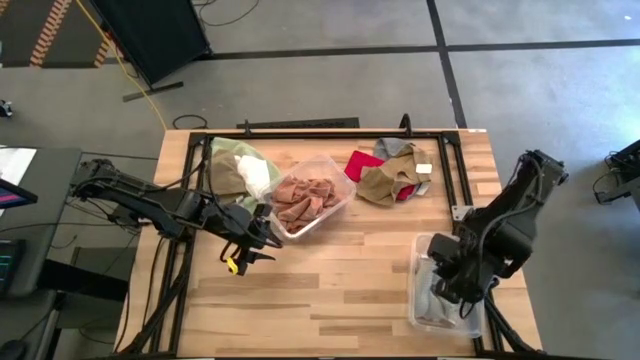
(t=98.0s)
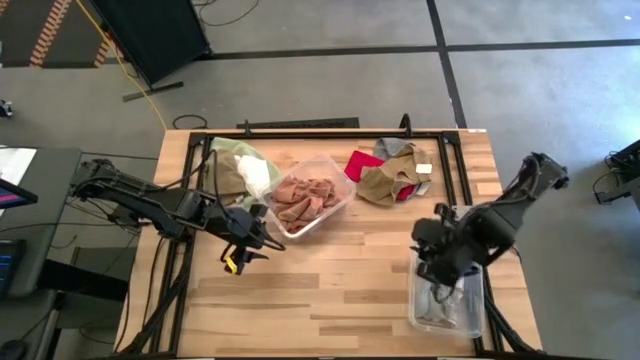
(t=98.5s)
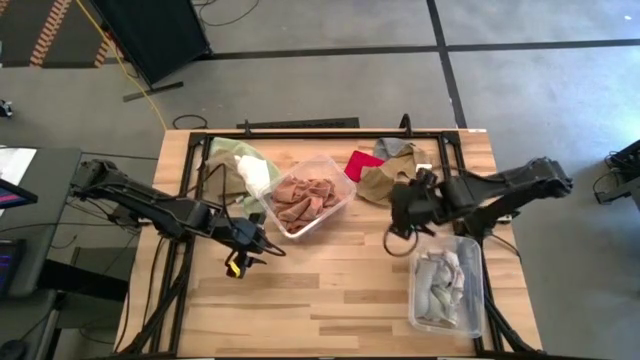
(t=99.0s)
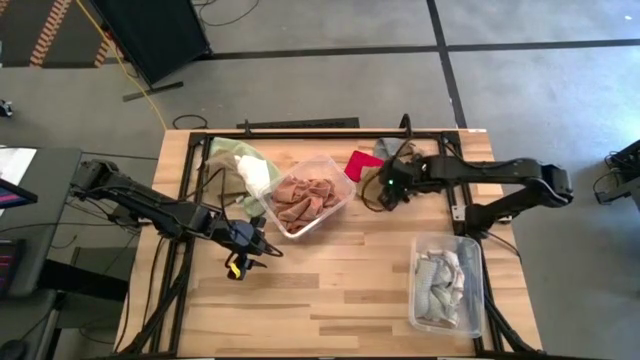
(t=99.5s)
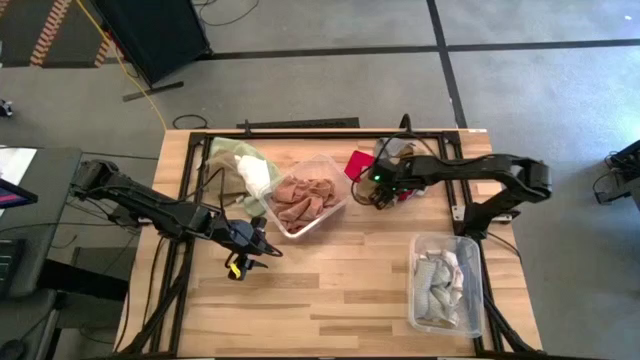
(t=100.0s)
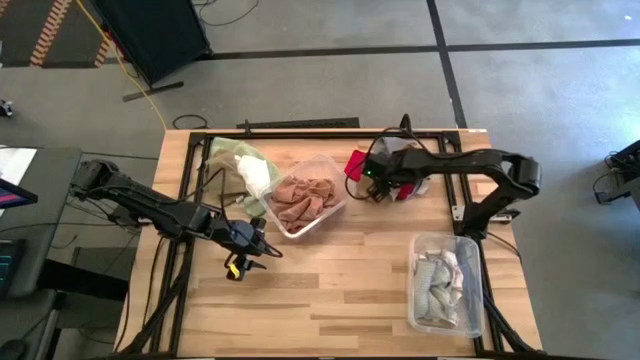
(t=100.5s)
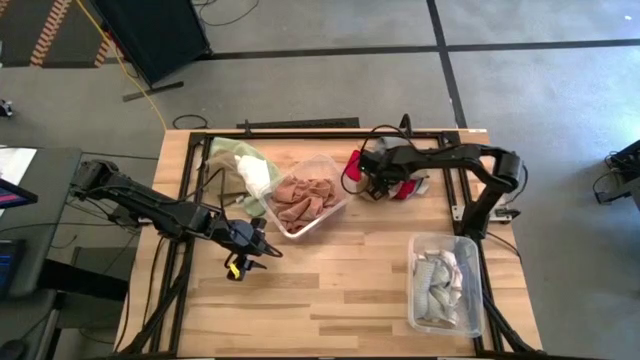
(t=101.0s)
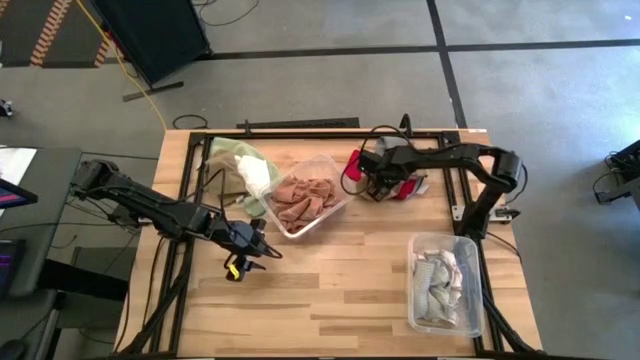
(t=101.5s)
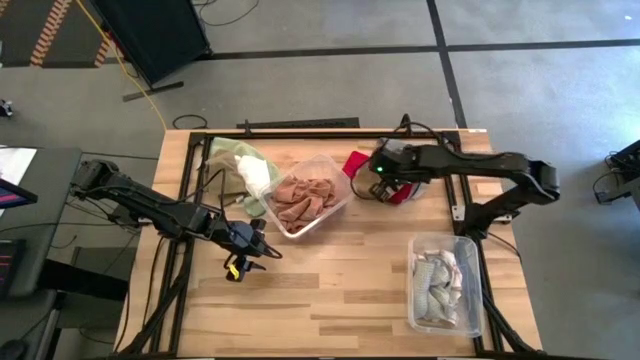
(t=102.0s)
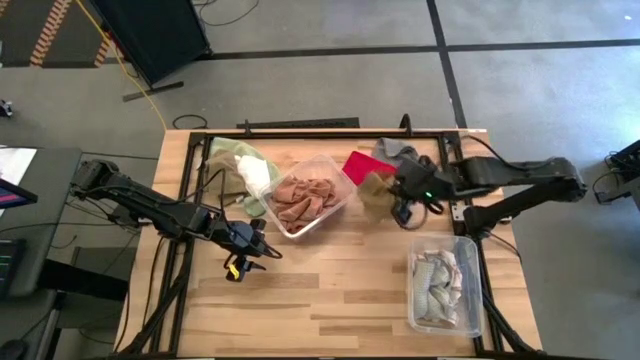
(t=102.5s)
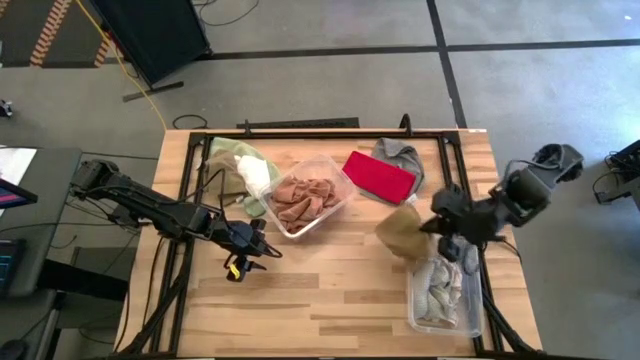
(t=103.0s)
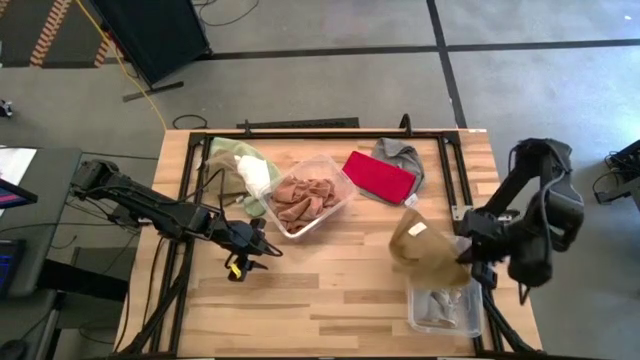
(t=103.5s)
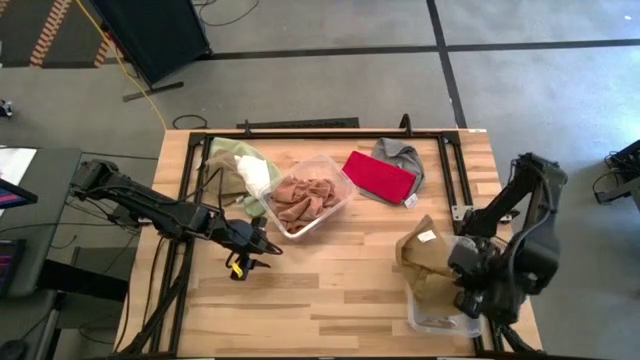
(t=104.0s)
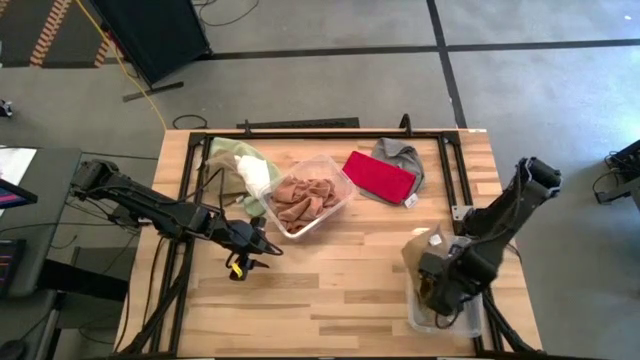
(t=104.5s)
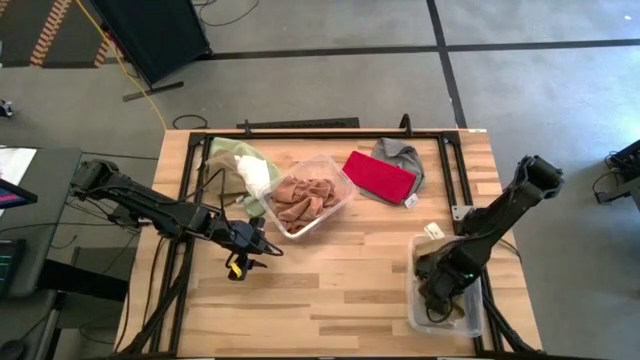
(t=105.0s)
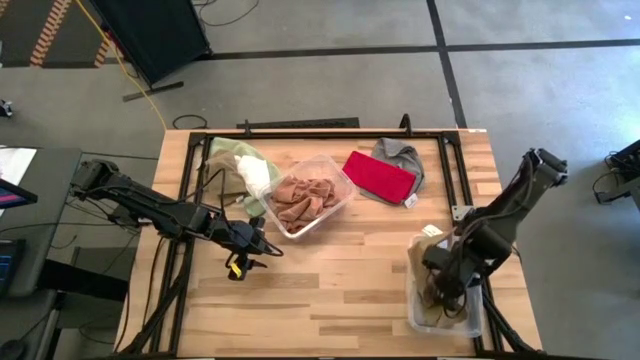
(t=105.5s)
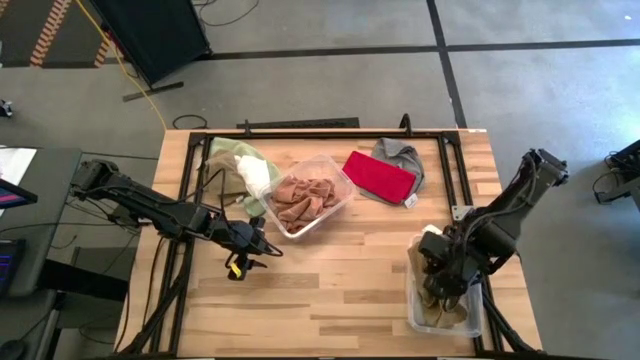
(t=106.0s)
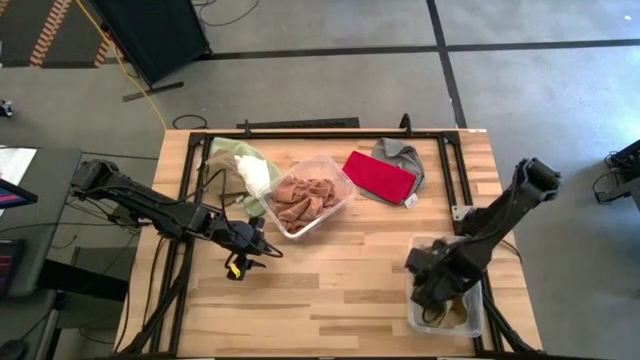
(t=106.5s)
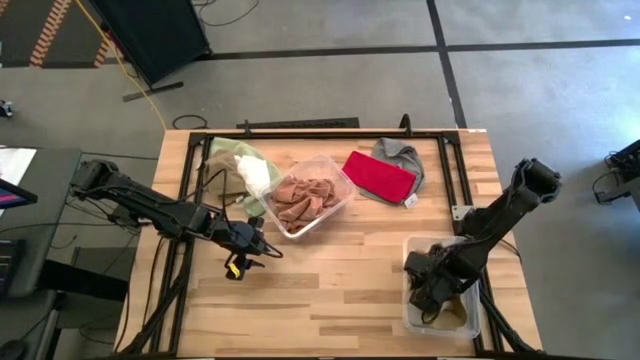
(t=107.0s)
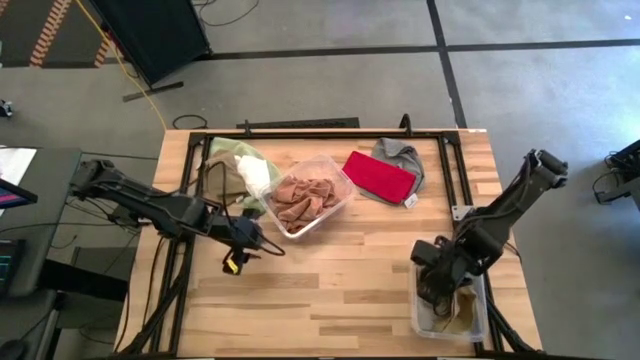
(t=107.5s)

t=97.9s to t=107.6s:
Task: Sort towels by color in basket
Put the brown towel into the bottom transparent bin

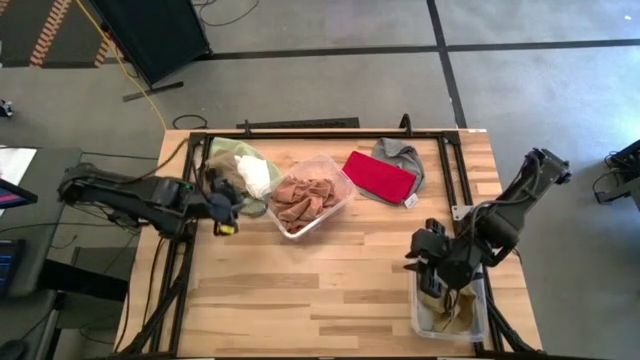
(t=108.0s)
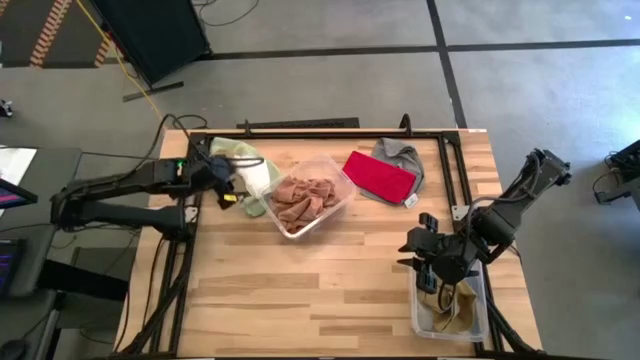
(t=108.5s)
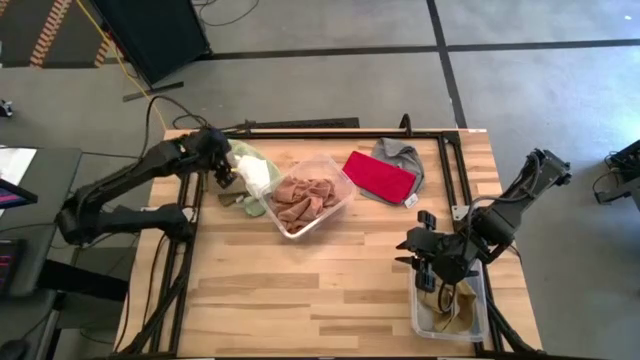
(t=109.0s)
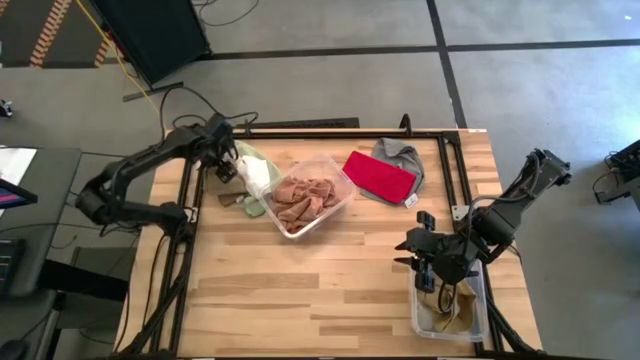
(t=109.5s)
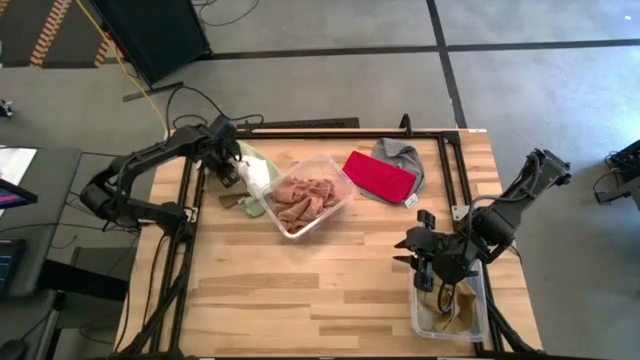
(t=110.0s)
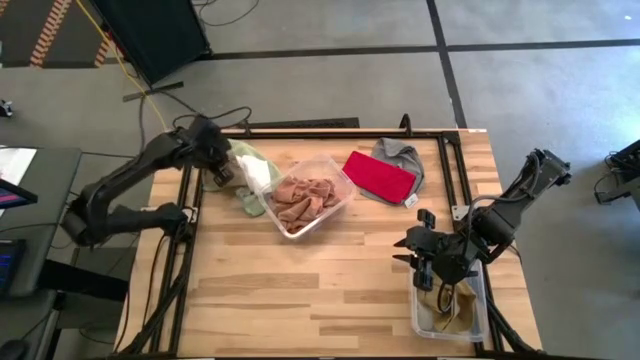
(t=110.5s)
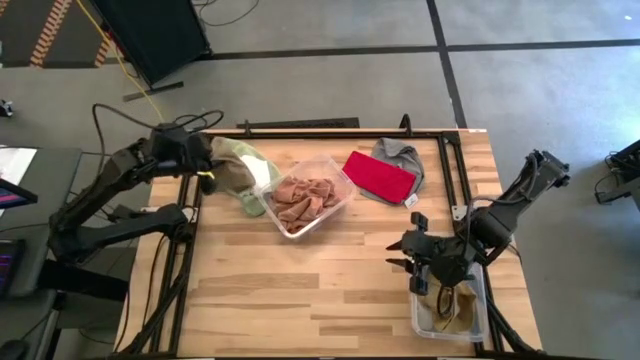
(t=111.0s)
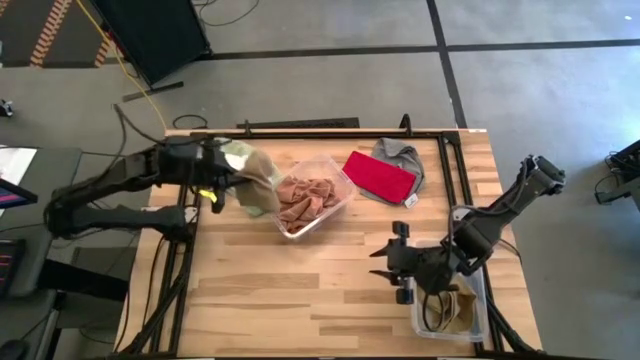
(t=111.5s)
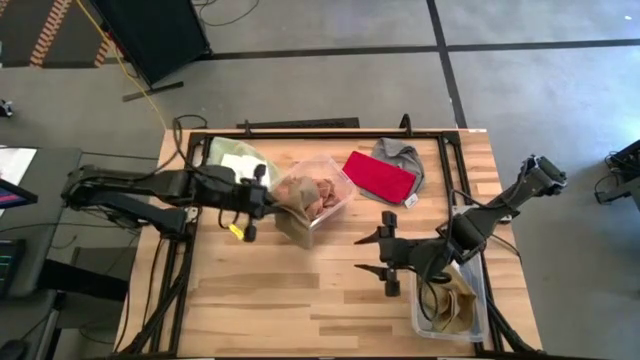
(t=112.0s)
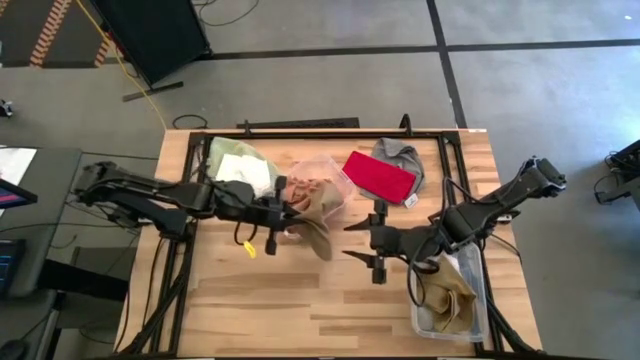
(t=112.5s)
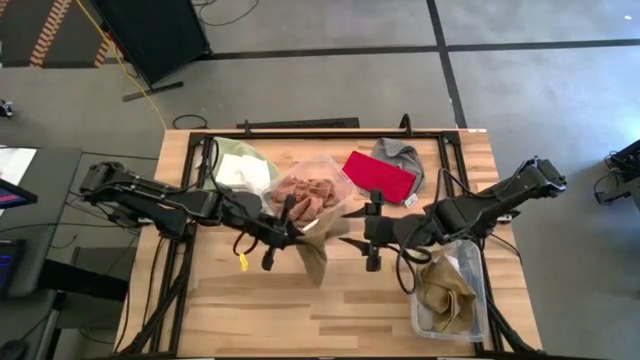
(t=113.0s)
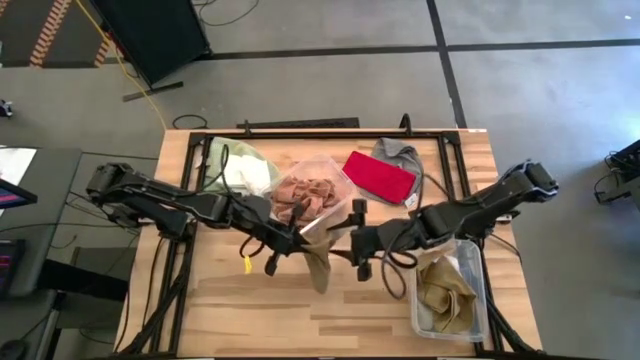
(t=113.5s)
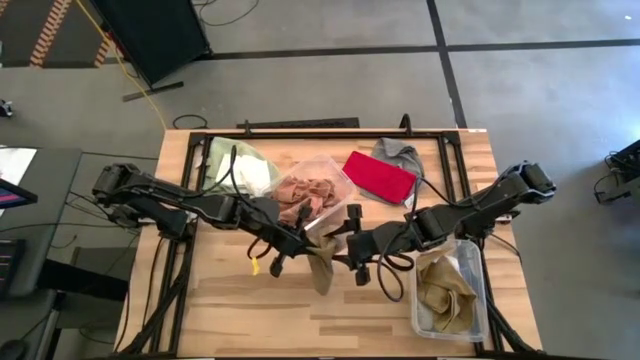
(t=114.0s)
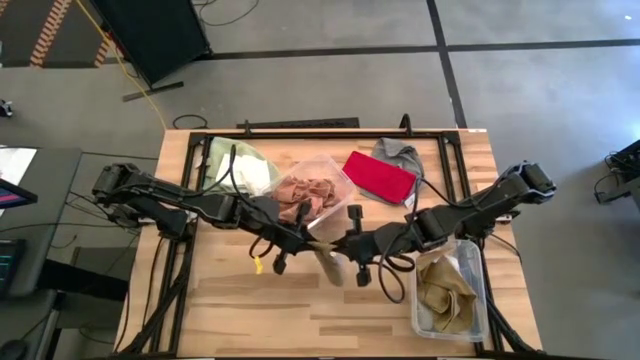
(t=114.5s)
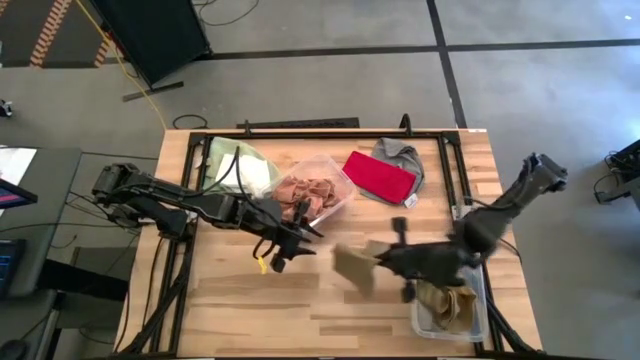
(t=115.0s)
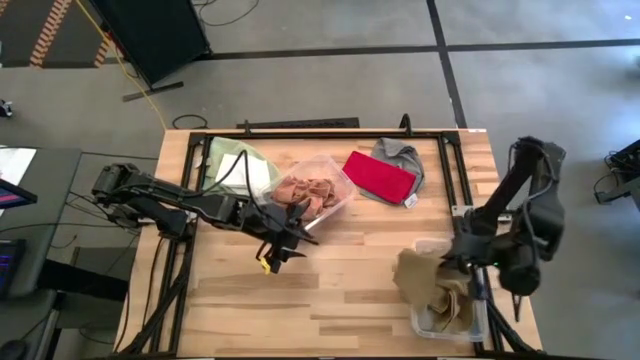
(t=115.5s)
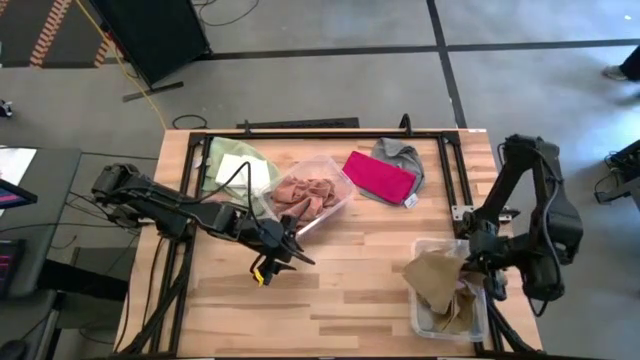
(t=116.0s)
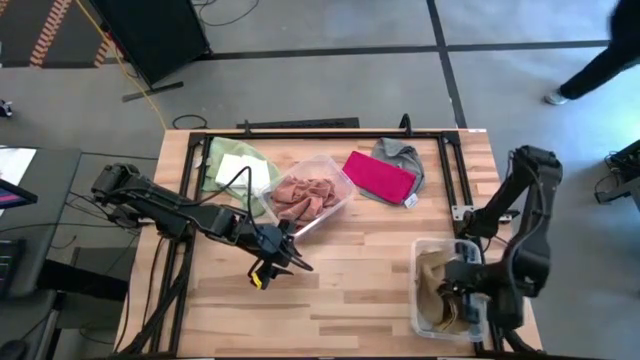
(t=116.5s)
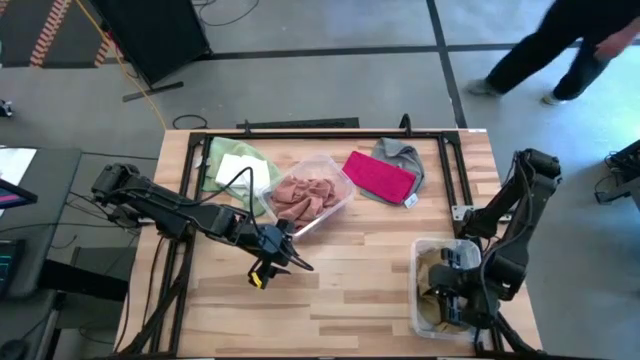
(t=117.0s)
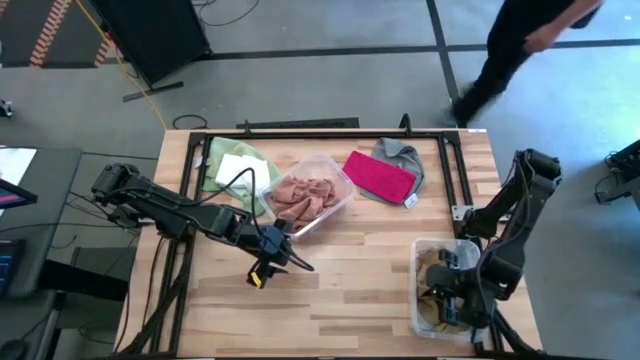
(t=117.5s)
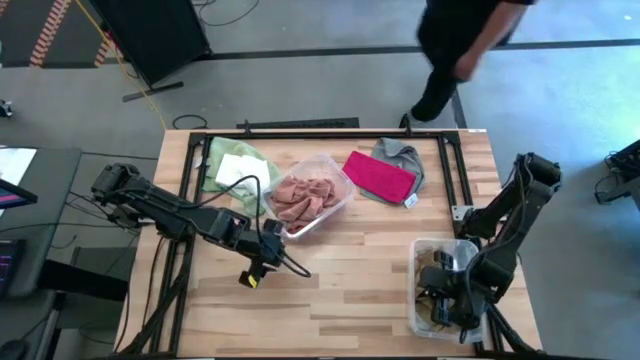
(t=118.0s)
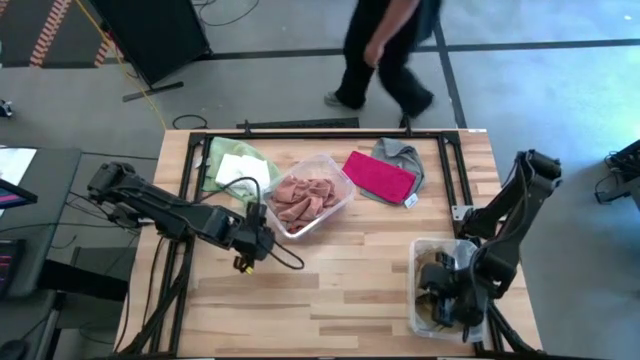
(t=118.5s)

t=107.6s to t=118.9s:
Put the brown towel into the bottom transparent bin
